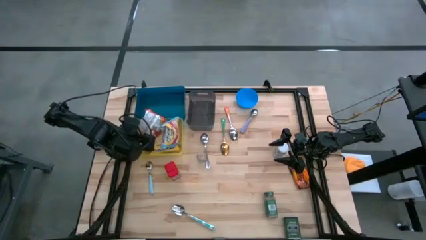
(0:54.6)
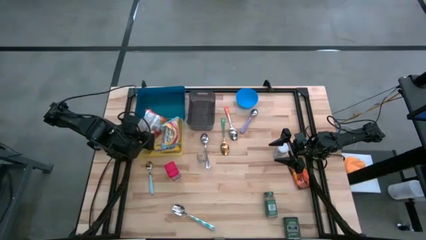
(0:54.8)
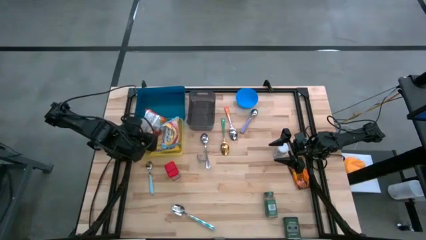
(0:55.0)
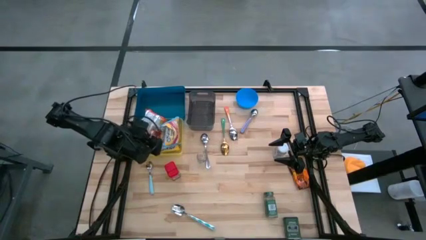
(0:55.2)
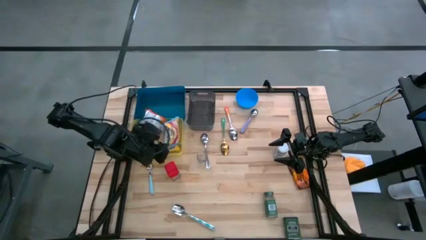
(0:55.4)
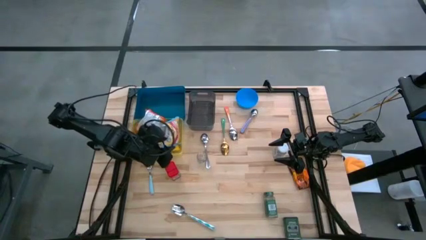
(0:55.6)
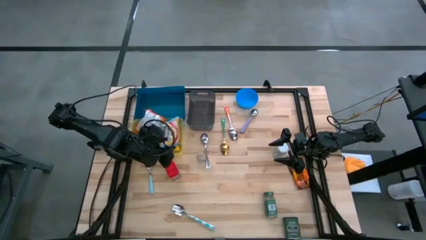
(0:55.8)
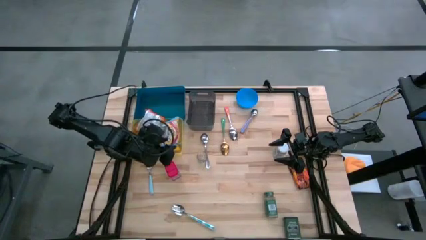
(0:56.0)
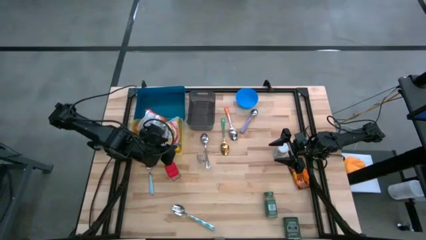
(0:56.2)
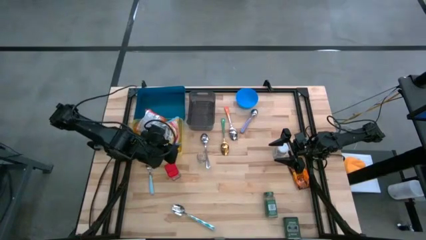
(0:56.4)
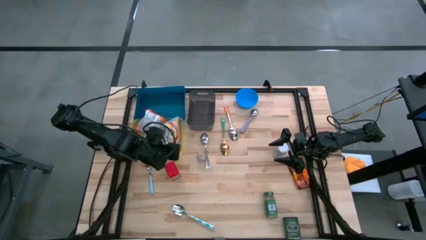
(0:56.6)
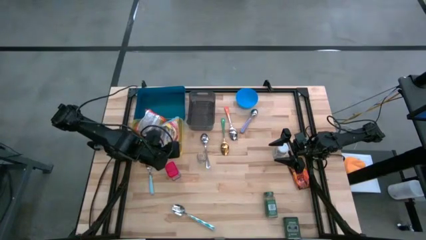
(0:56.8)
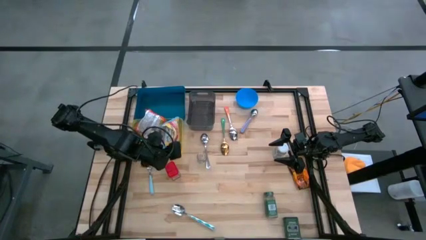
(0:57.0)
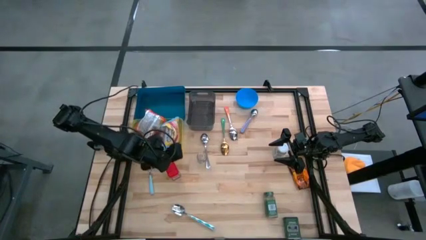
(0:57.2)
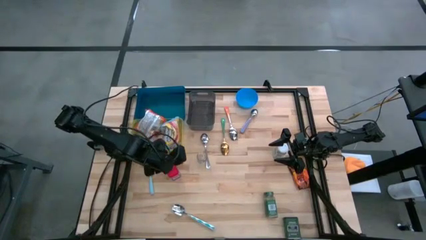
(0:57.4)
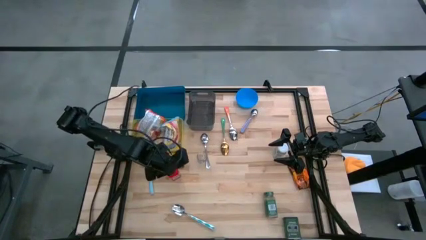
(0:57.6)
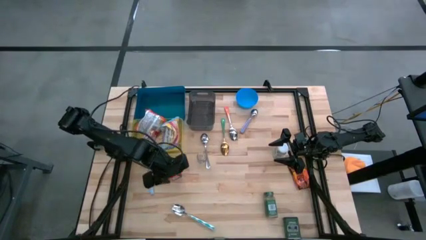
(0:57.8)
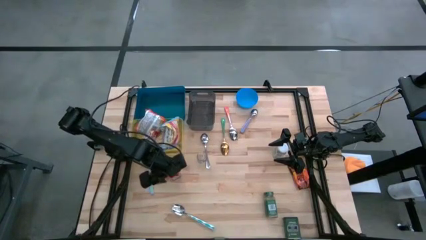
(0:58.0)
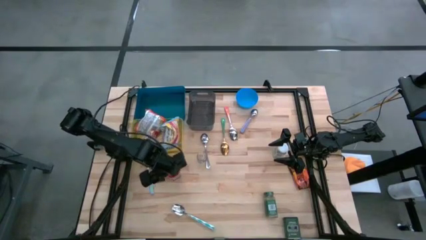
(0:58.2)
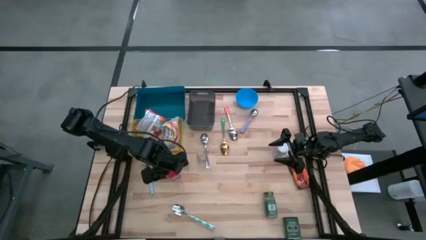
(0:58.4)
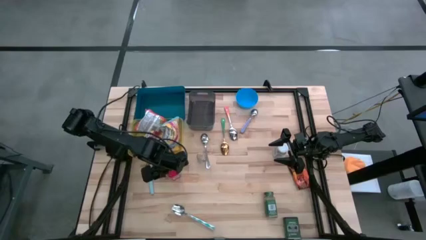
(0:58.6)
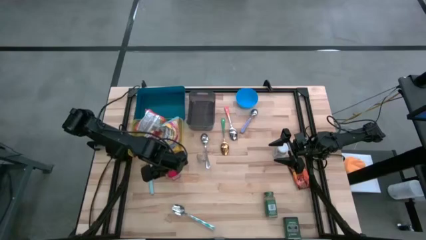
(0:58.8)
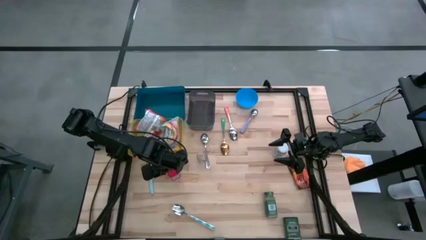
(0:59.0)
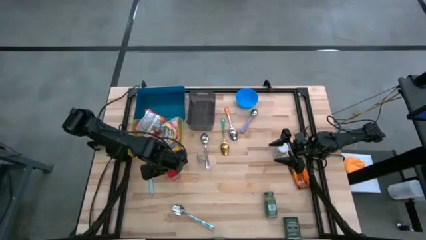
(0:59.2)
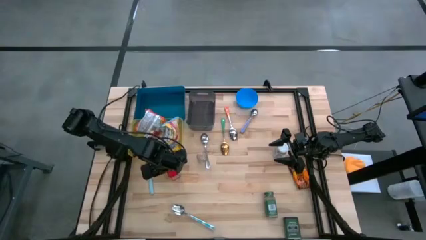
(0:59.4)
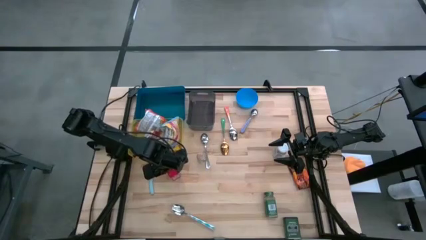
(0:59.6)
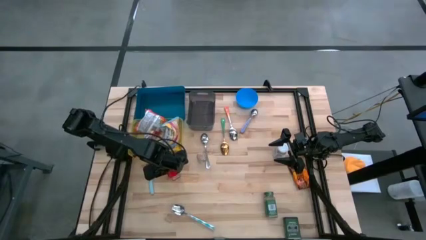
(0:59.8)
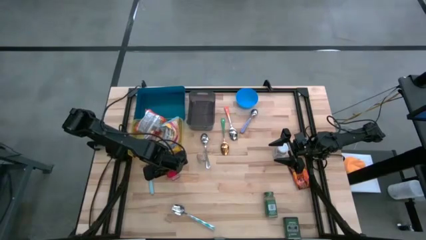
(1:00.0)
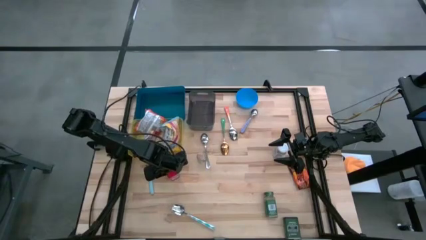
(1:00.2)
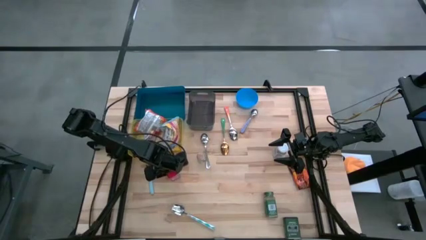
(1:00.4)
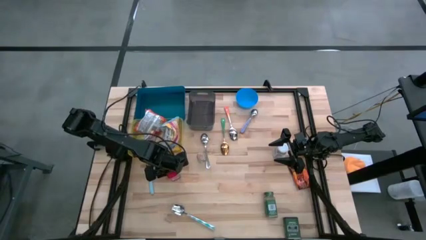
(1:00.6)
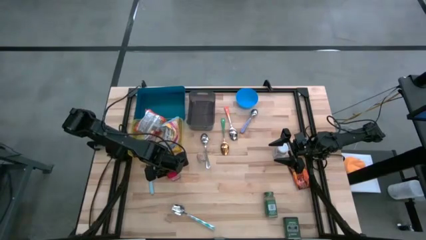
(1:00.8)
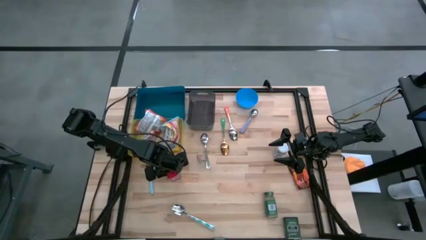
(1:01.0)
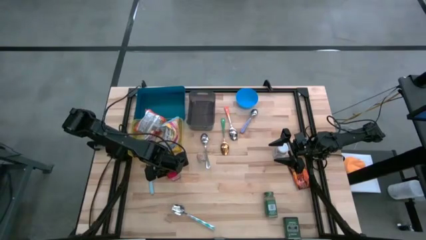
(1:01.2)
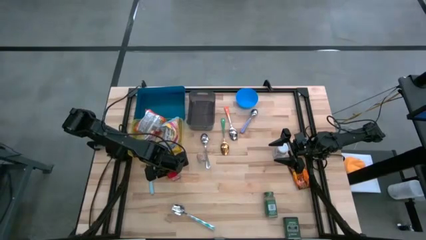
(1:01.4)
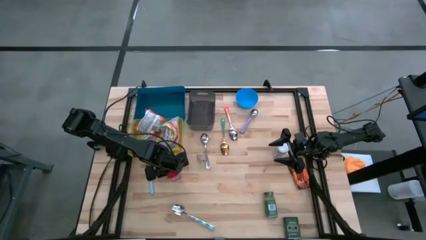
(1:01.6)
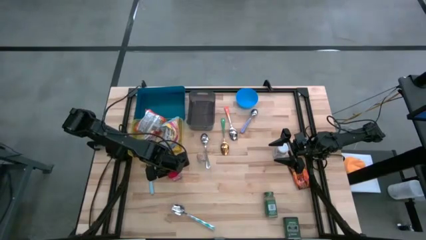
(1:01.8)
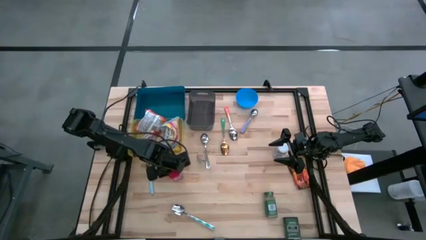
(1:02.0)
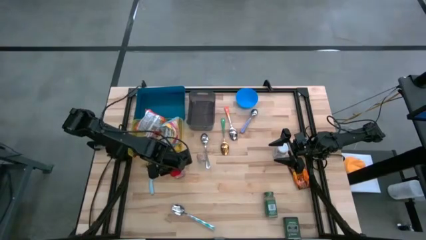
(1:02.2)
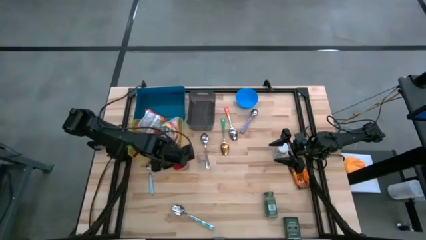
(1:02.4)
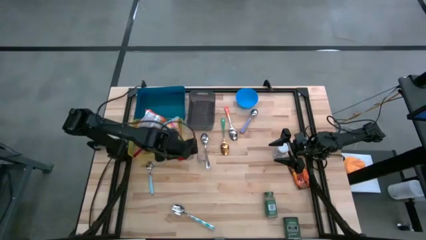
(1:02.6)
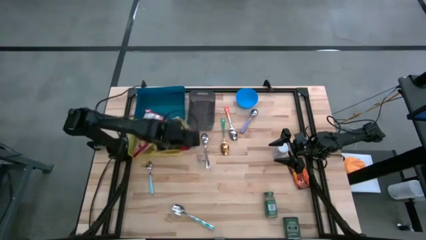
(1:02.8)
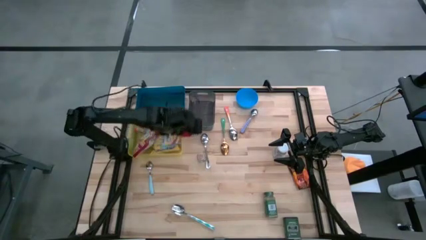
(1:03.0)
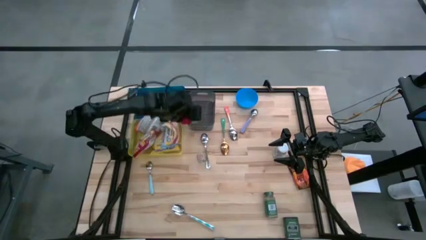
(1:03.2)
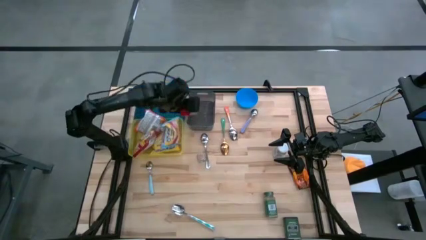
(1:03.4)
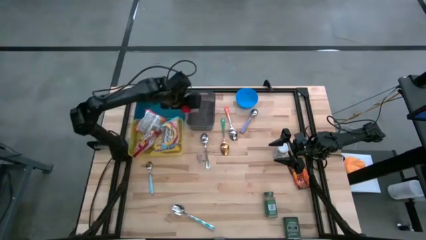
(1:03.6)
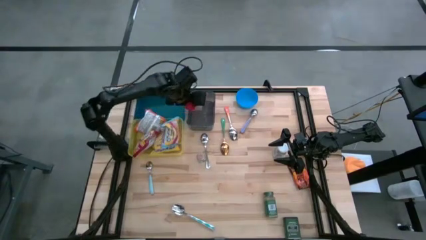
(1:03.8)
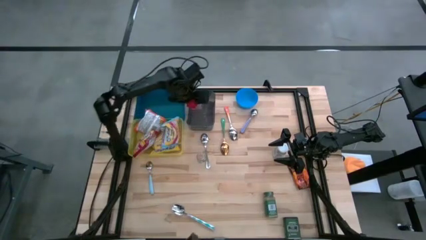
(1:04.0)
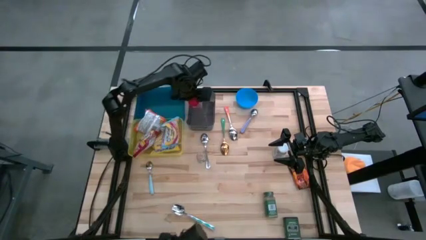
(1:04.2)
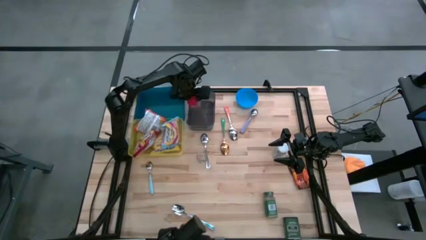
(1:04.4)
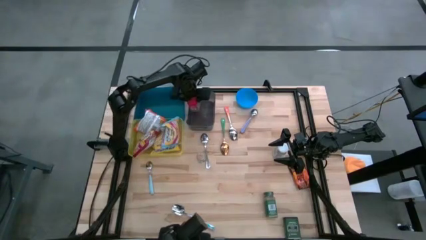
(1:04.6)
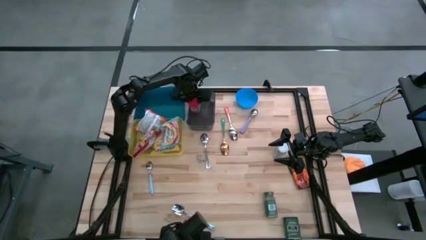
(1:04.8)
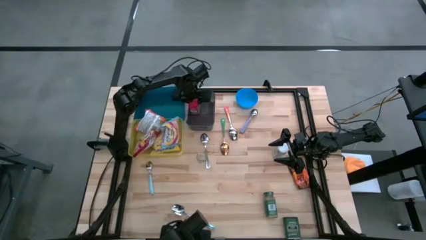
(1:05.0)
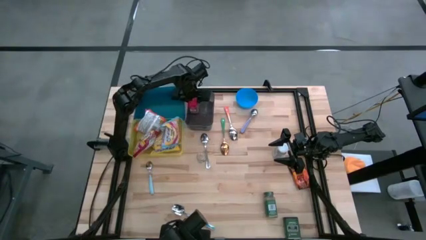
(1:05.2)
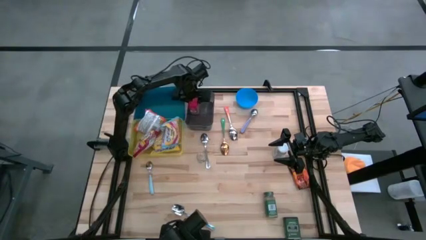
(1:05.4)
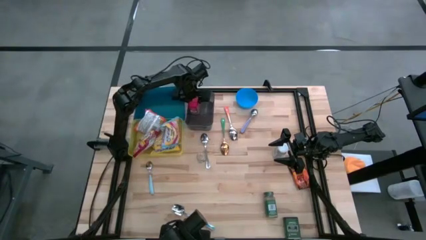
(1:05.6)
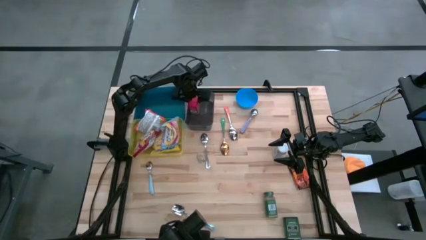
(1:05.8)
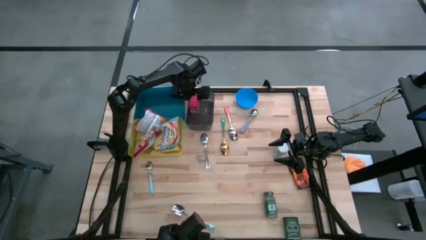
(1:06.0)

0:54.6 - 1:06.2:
Put the red seasoning can into the black bin

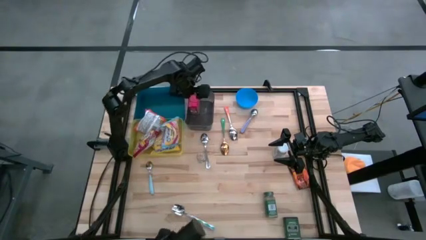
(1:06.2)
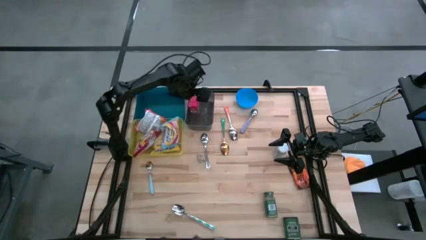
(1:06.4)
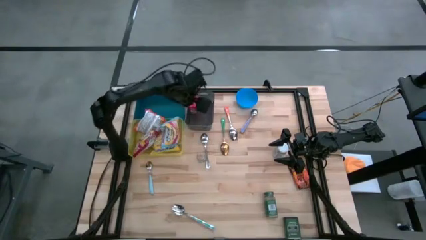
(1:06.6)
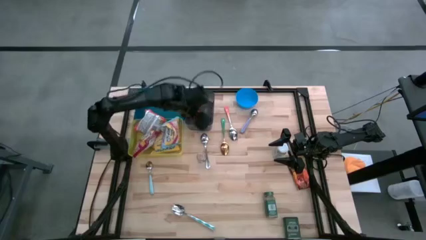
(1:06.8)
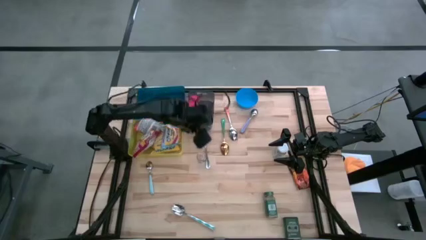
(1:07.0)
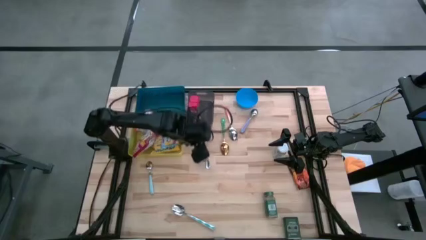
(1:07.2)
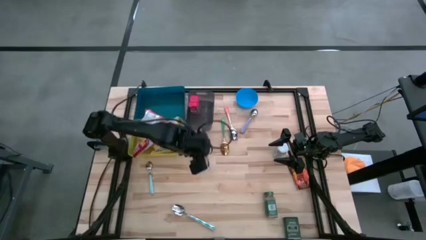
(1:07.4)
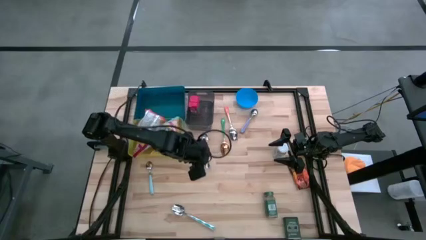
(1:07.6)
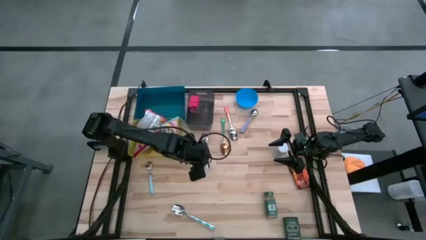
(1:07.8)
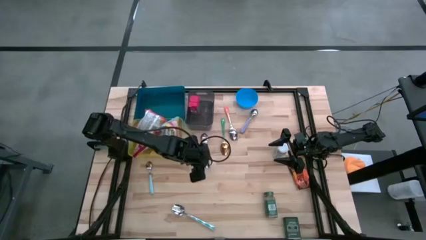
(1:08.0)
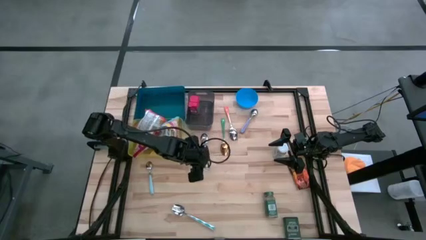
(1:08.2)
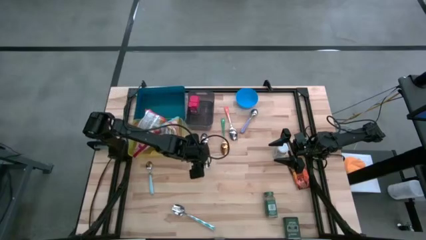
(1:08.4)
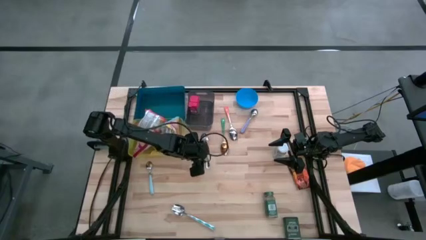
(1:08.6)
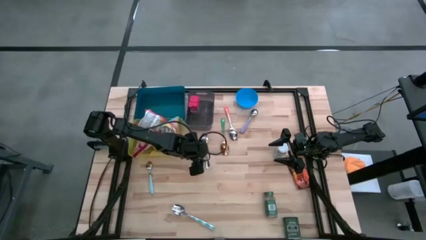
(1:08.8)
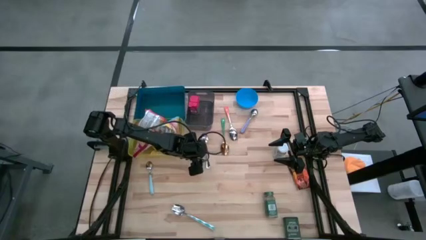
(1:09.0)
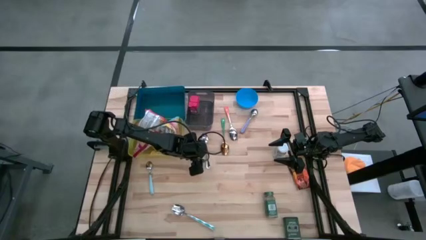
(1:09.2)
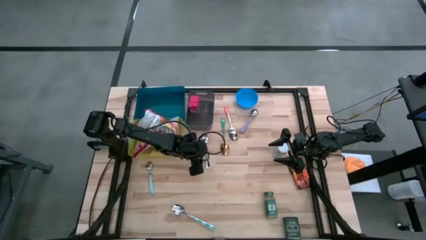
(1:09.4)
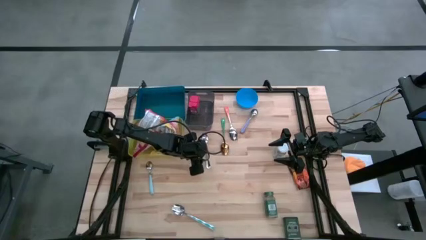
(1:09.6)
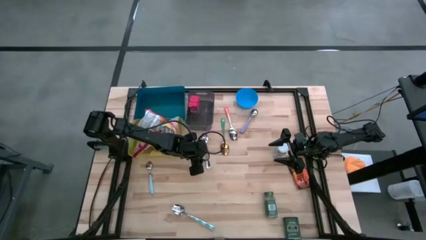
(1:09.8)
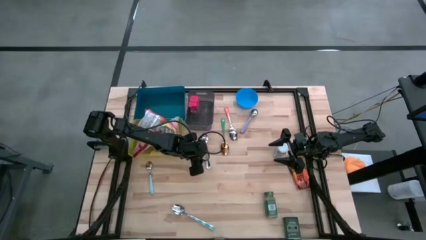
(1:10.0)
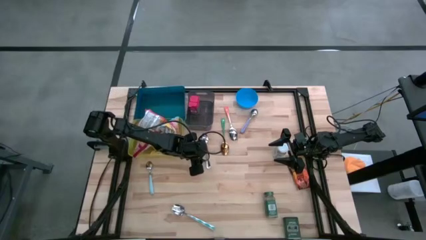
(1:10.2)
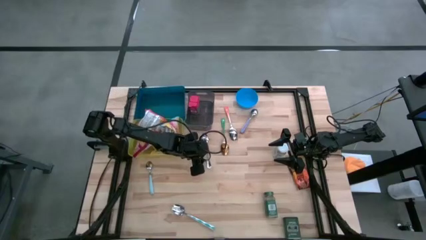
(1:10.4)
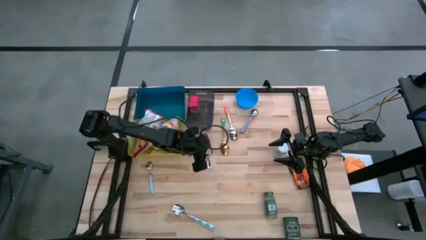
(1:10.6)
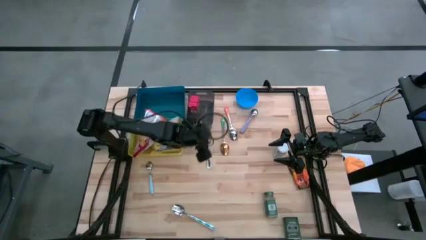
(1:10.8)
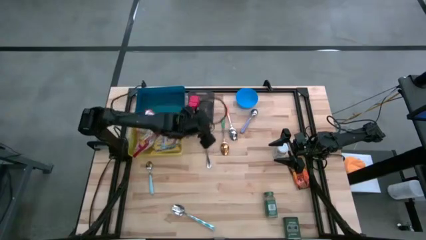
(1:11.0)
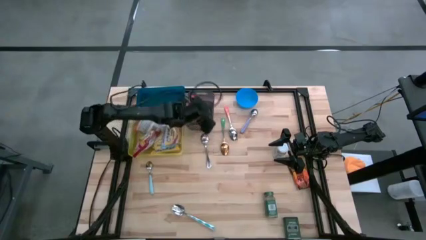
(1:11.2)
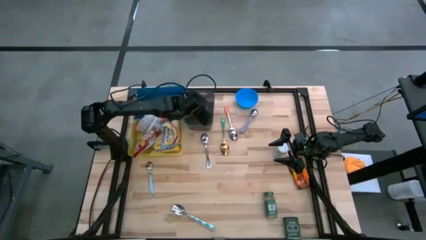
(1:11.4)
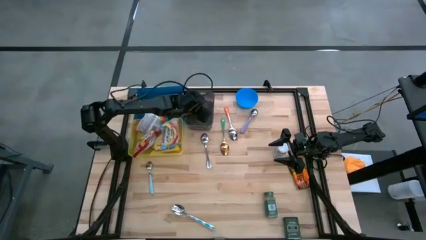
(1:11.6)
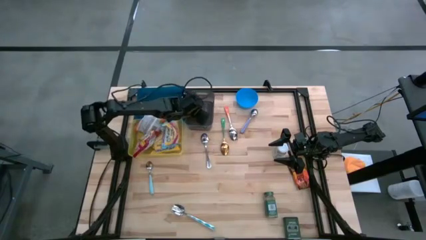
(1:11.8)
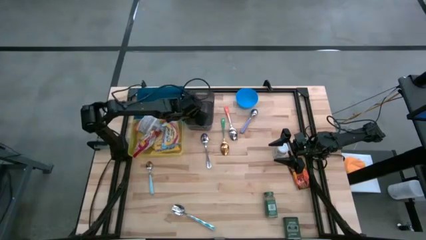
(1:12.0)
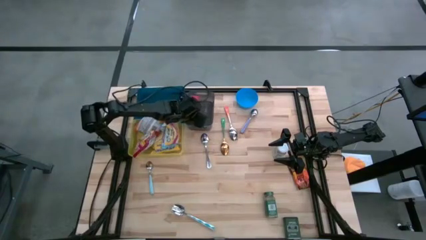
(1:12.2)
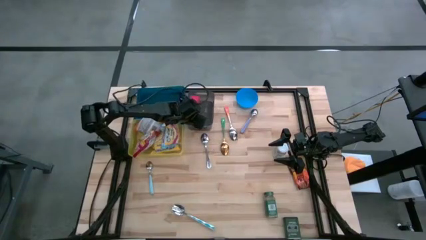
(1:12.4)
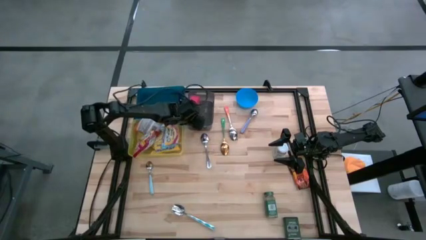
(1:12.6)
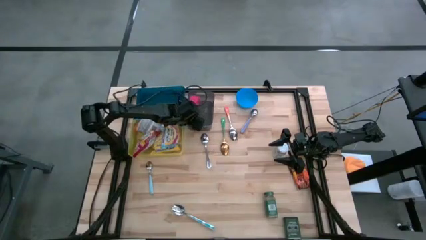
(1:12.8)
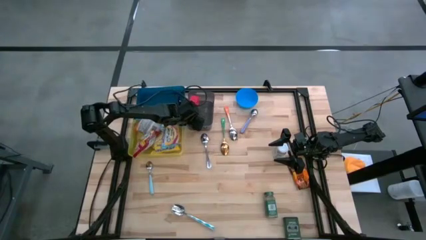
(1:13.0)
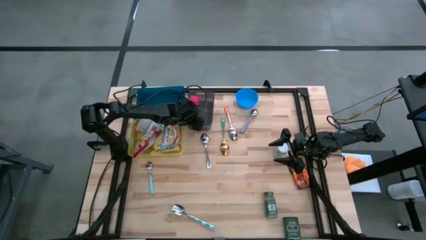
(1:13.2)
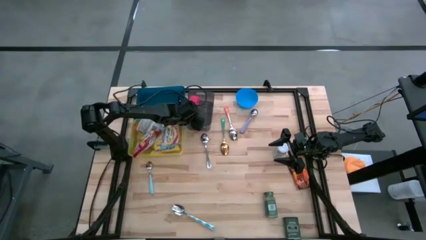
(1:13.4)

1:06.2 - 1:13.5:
Put the brown seasoning bottle into the black bin
